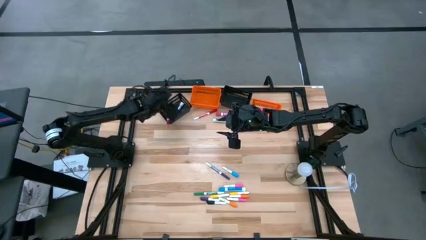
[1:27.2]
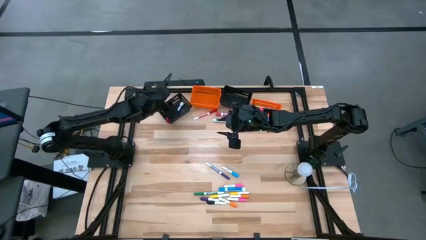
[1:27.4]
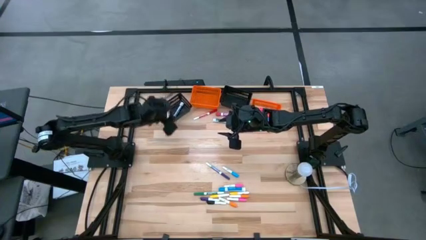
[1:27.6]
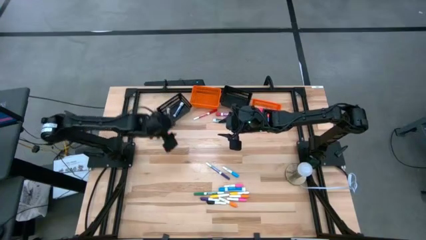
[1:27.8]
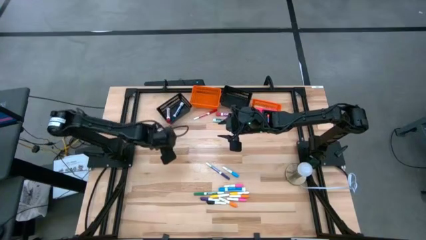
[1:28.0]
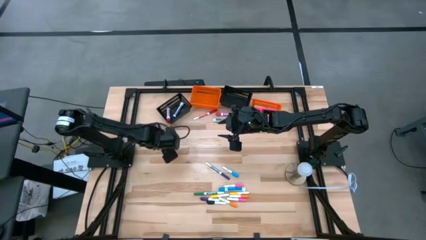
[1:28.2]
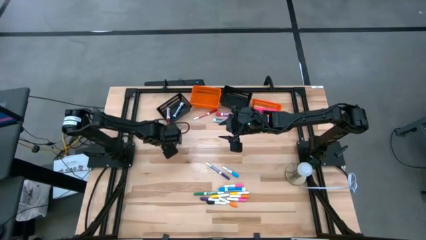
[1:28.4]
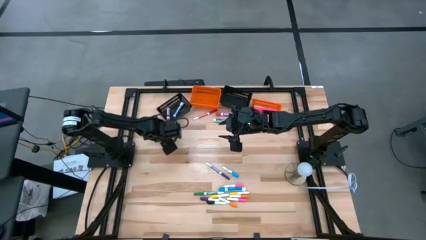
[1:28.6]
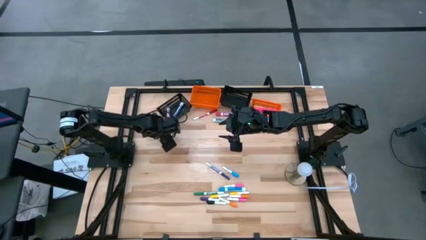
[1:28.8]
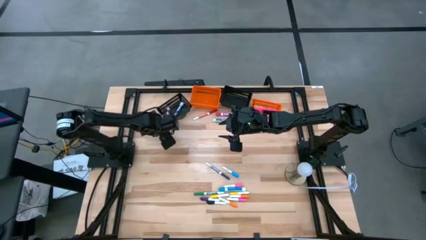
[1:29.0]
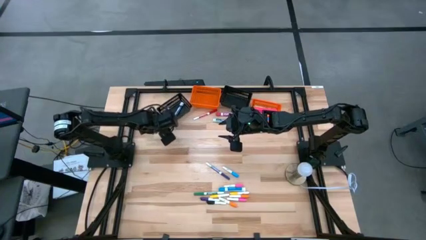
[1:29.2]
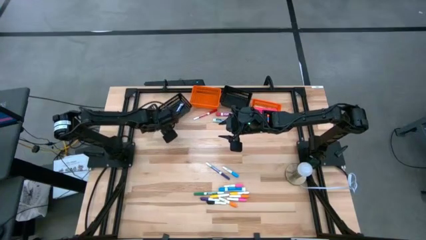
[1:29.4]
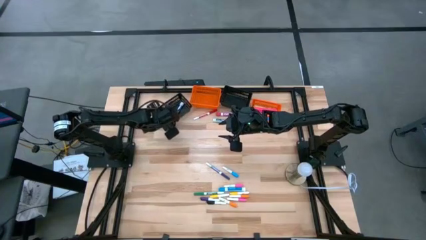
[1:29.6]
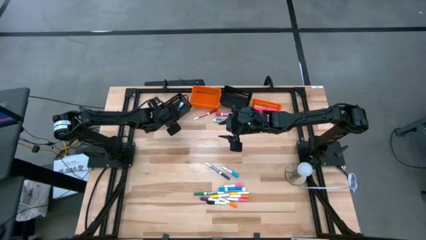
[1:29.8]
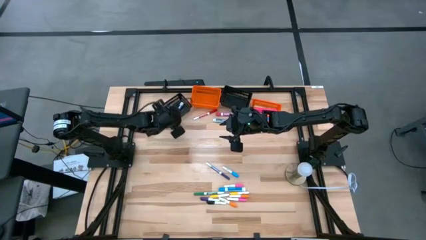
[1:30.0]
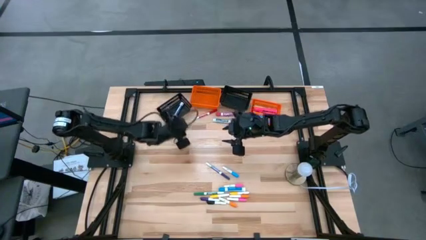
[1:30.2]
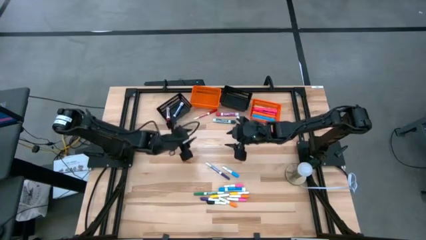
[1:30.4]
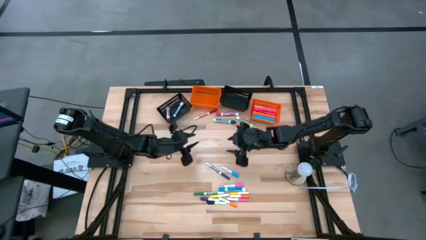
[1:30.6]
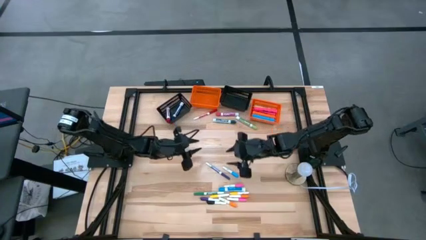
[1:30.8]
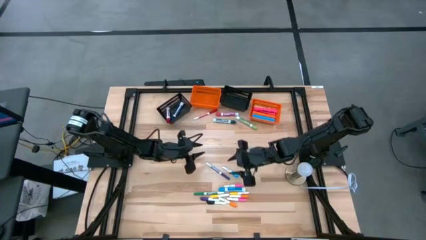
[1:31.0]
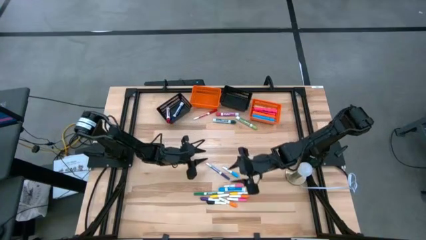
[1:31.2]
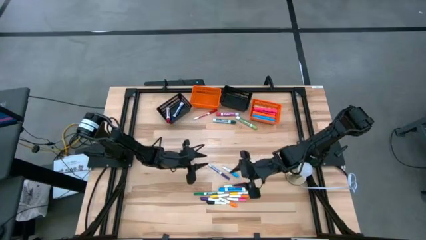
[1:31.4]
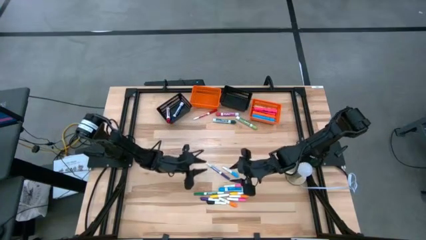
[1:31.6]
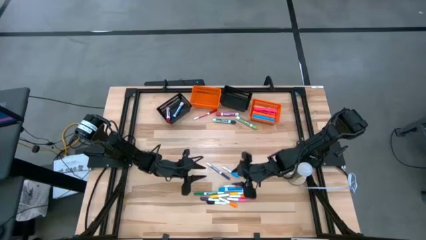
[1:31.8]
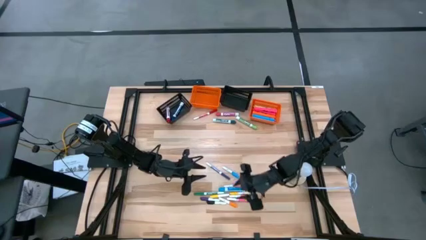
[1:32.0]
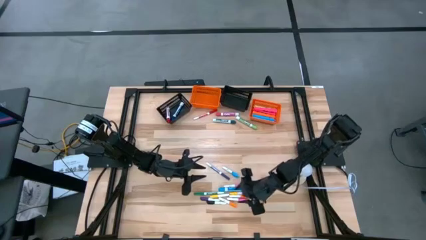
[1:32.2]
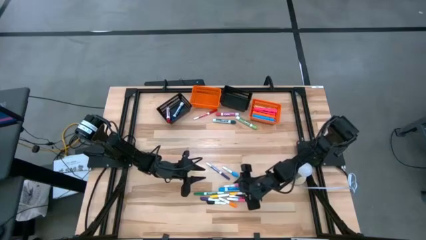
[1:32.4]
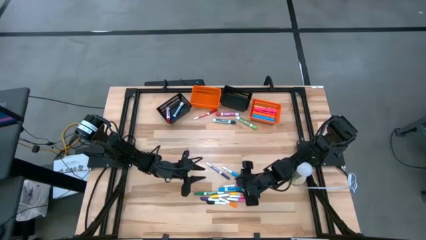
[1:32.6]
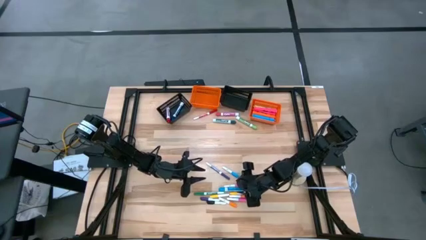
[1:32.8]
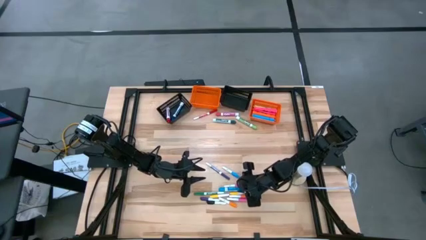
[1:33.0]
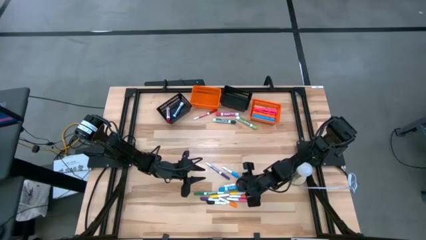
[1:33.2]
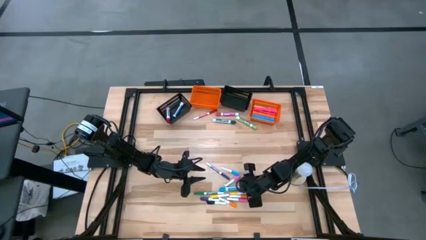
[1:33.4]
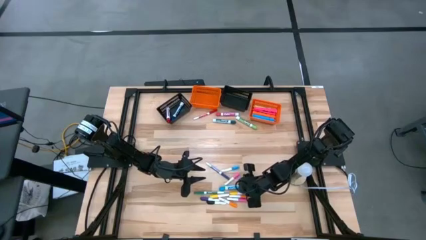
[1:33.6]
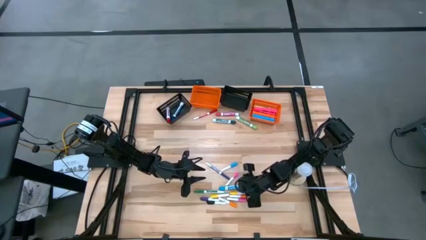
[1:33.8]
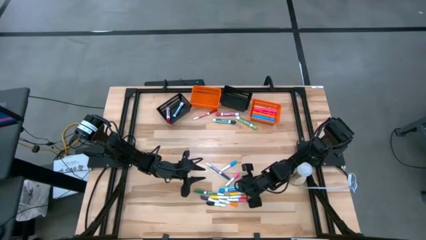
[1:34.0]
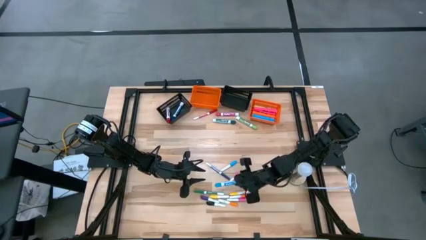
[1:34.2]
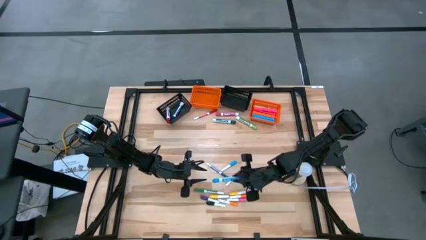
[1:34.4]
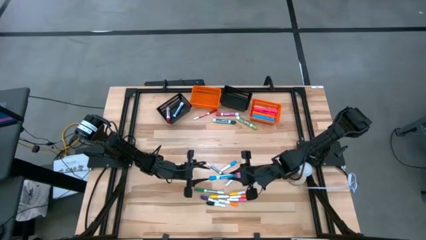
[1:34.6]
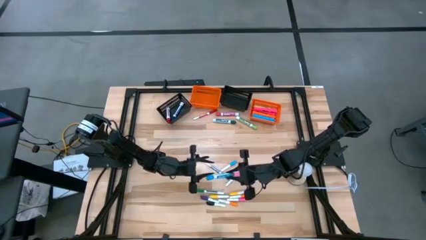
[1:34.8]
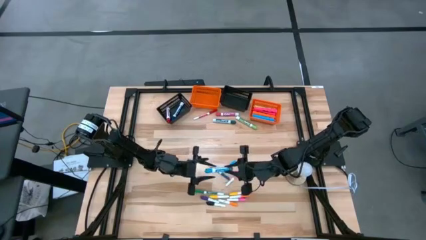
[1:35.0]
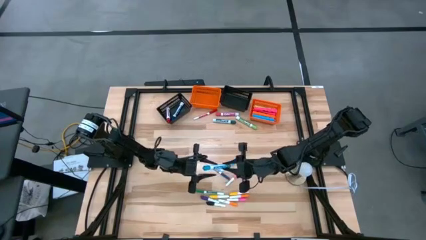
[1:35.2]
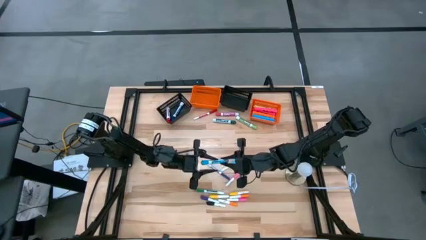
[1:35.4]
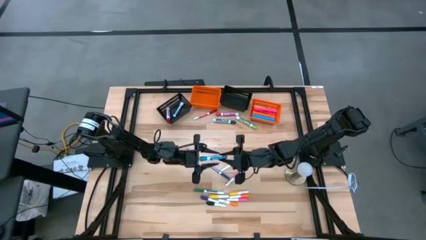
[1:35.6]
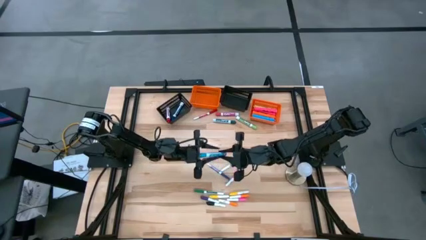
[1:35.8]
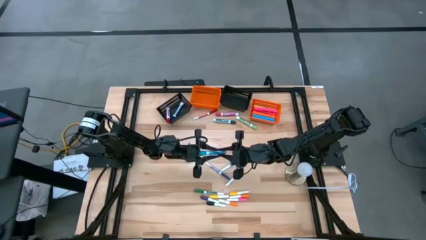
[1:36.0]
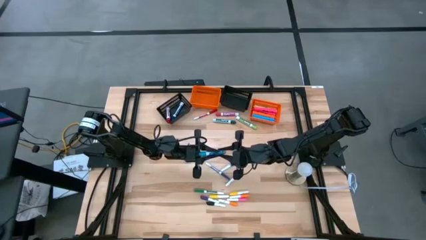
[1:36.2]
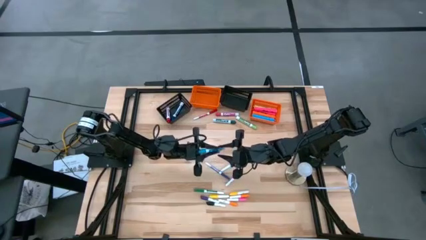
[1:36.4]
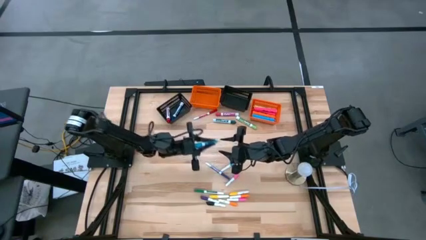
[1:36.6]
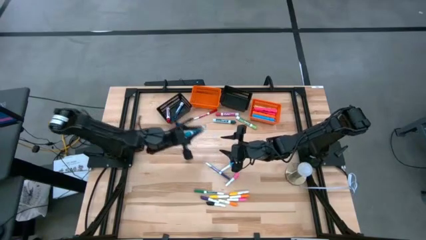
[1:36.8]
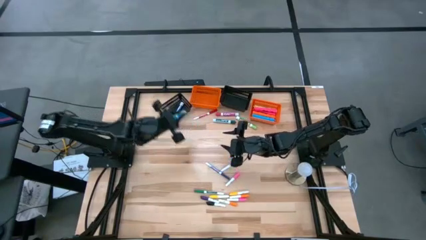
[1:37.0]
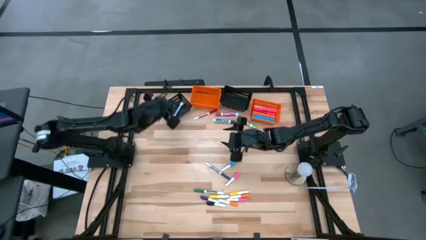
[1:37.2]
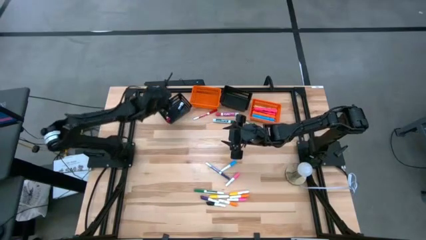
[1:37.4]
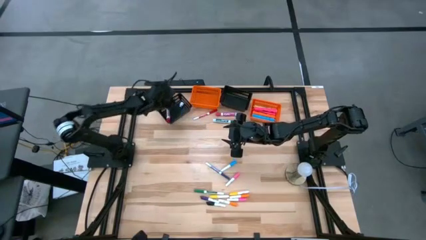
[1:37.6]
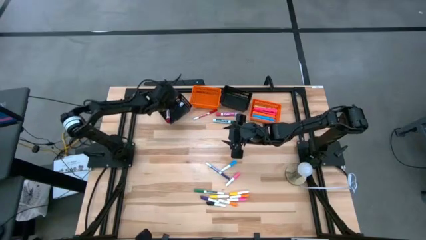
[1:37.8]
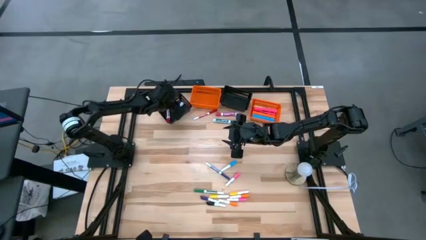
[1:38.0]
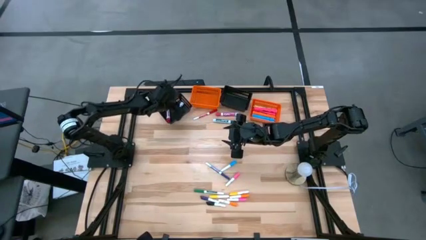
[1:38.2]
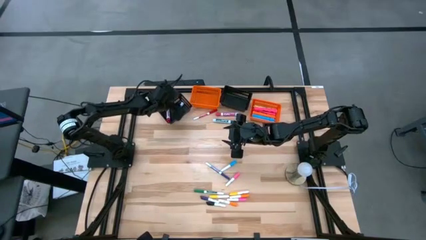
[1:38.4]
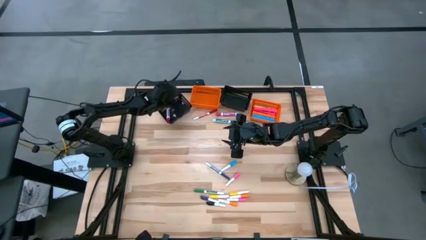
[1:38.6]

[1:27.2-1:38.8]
Task: Pick & Place Markers
Put the large light blue marker into the left black bin

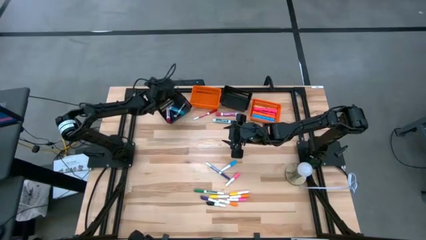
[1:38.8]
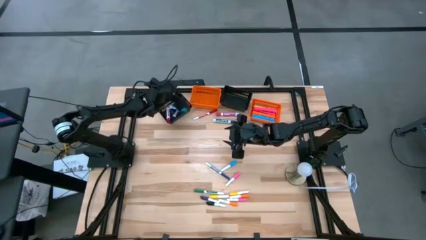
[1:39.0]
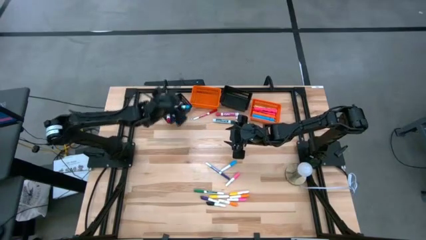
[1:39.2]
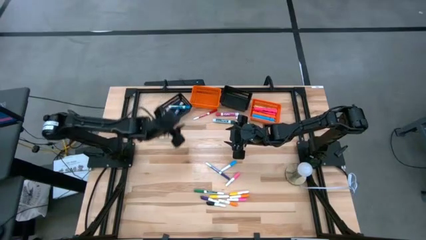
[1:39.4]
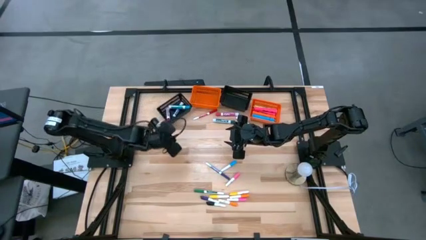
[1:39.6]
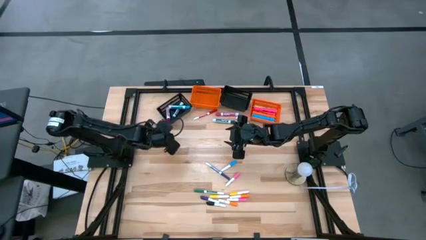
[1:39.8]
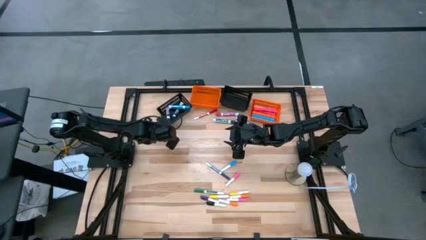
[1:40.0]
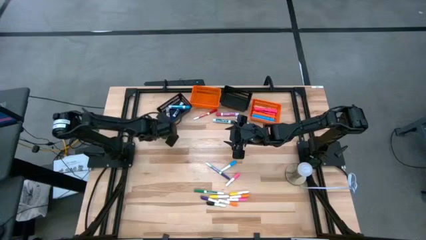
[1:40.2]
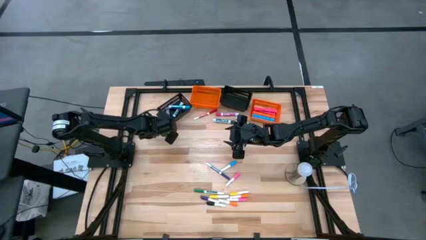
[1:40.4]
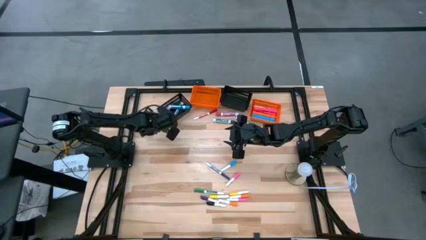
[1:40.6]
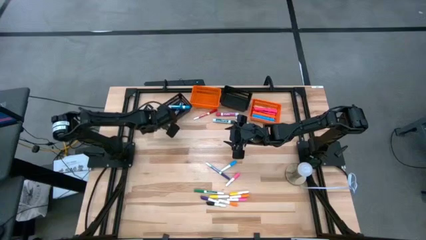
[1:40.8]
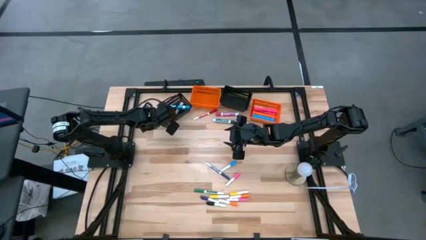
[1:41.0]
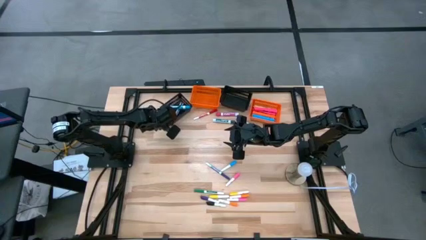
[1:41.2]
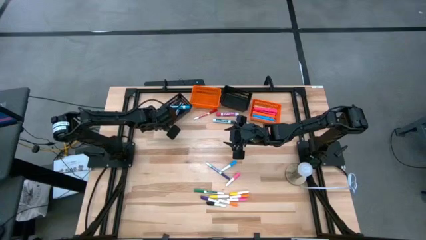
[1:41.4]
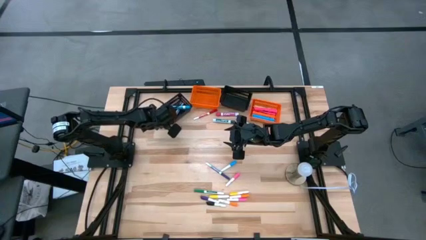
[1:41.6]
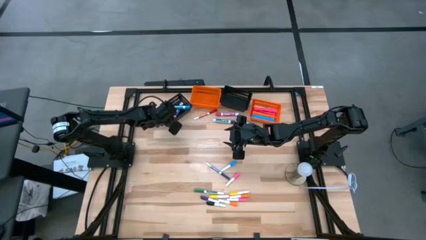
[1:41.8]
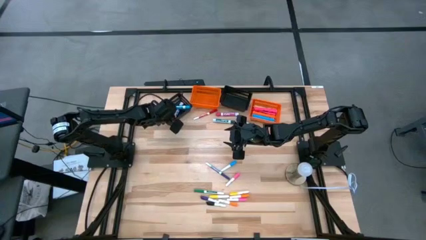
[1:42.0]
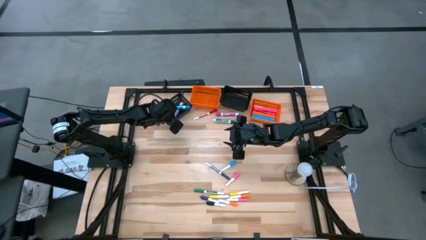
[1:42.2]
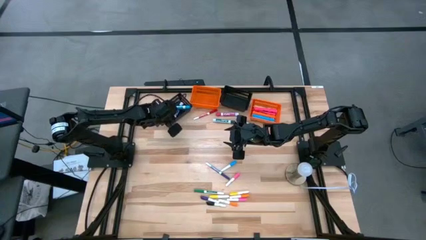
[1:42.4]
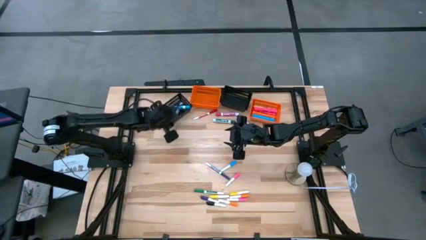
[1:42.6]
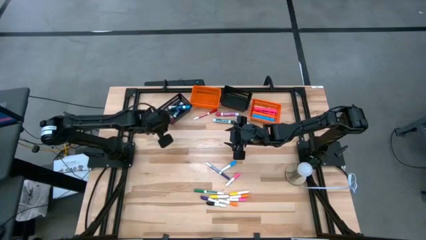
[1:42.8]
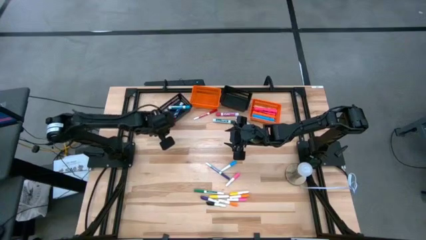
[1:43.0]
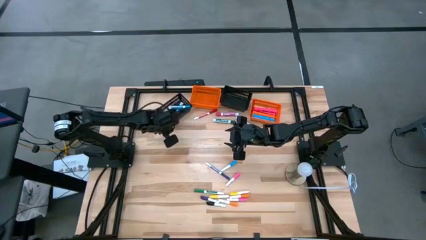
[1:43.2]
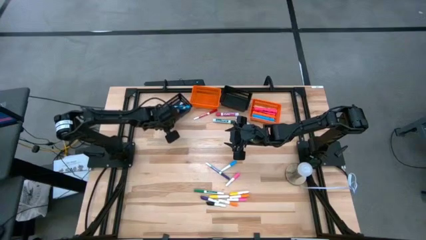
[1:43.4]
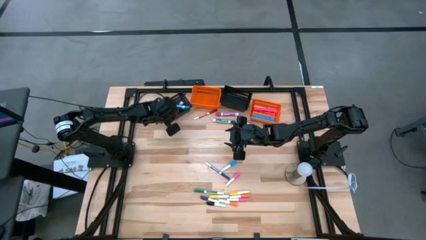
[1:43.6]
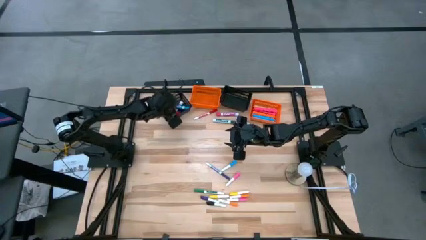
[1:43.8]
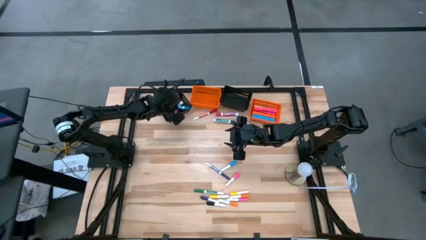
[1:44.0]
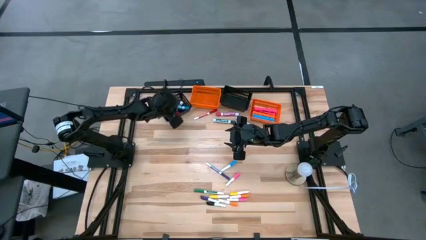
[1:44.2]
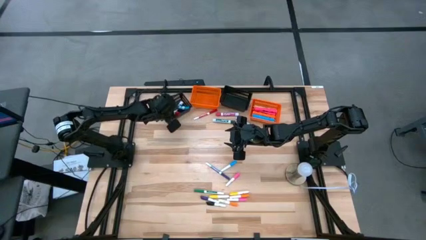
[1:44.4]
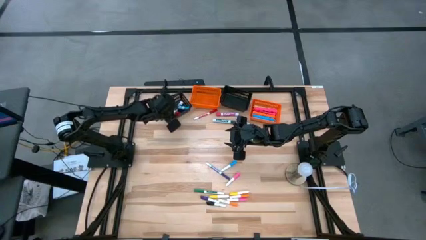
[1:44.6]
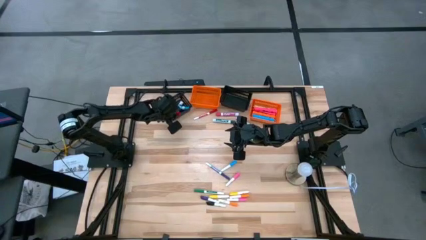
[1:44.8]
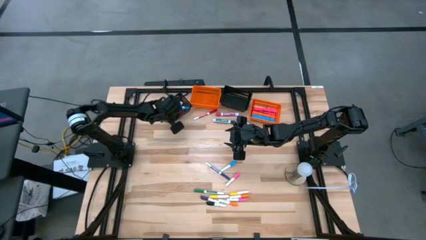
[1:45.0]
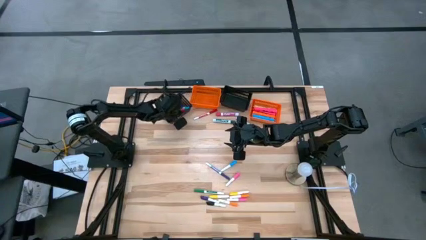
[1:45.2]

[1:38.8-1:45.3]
Adjust the large red marker in the left black bin
